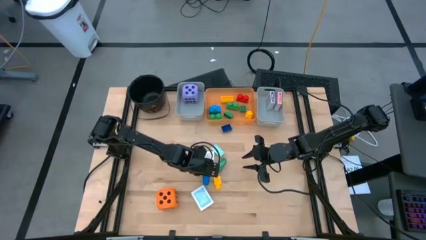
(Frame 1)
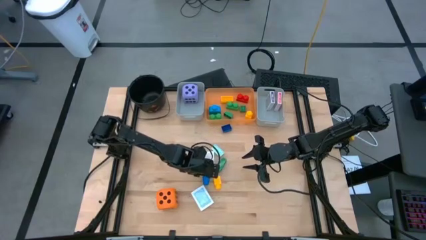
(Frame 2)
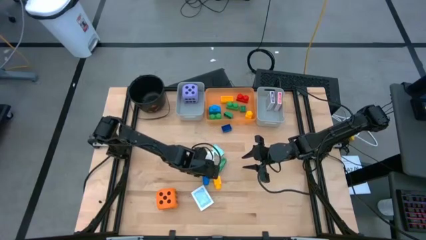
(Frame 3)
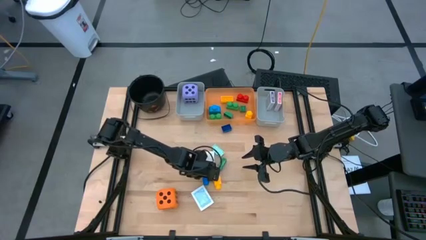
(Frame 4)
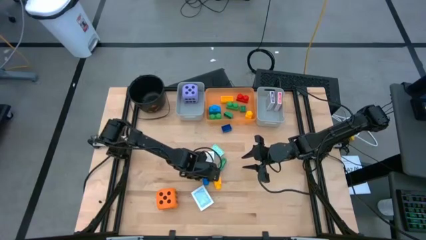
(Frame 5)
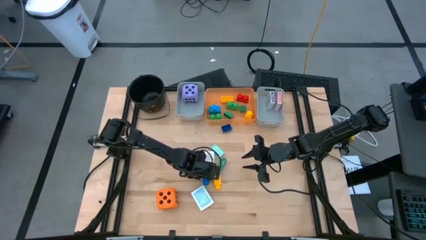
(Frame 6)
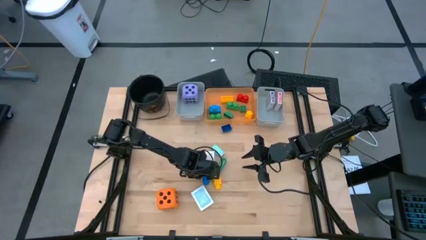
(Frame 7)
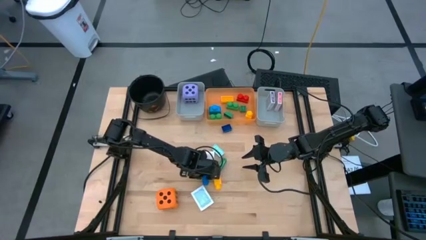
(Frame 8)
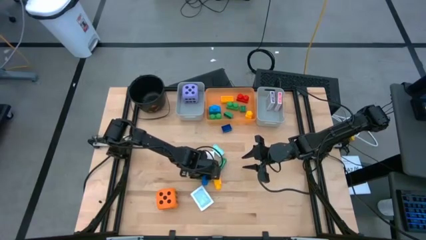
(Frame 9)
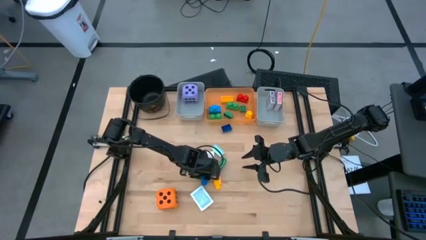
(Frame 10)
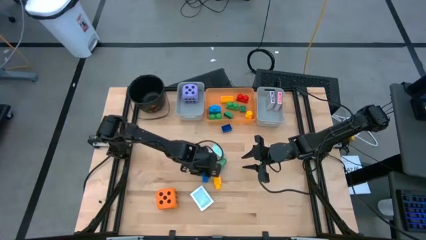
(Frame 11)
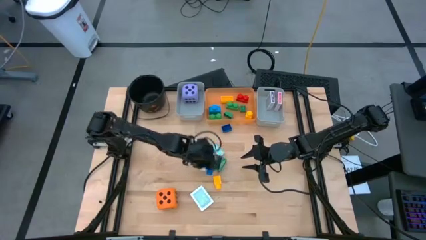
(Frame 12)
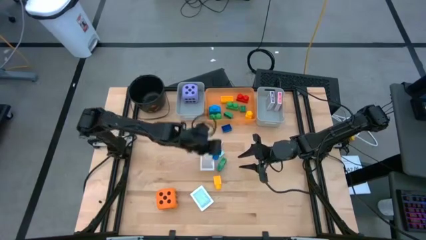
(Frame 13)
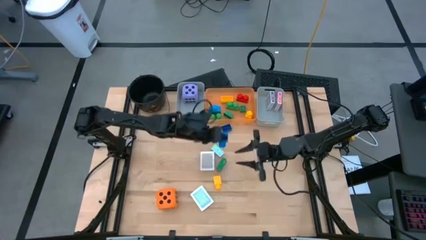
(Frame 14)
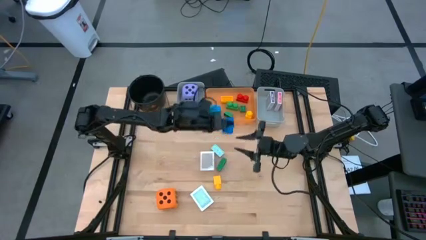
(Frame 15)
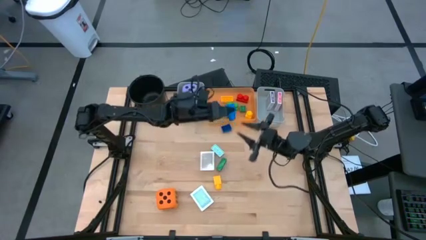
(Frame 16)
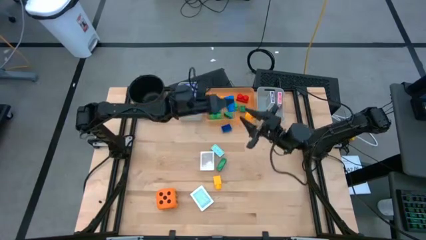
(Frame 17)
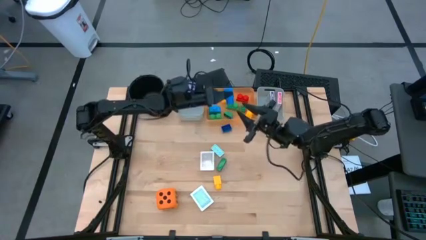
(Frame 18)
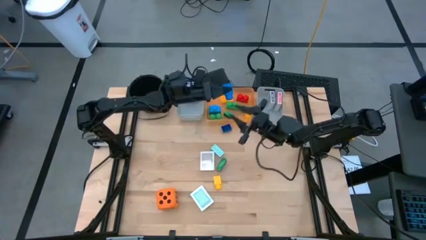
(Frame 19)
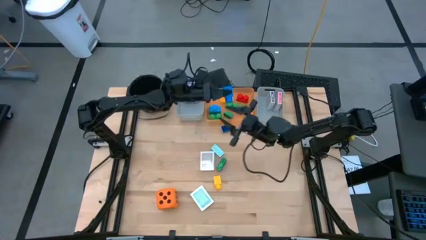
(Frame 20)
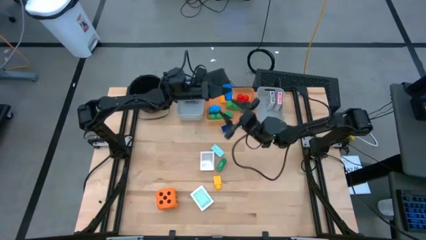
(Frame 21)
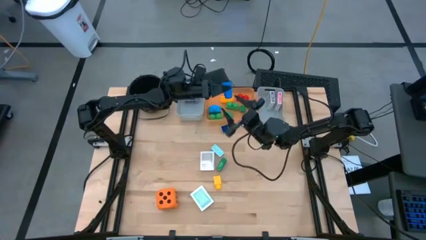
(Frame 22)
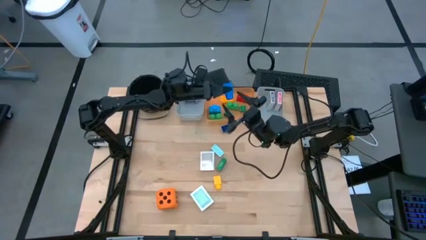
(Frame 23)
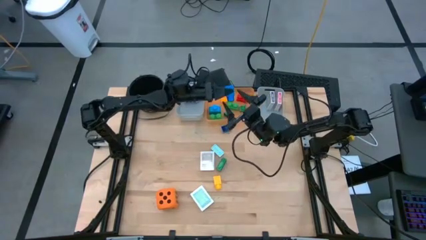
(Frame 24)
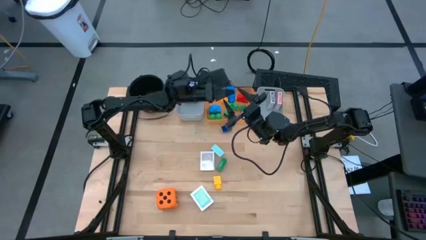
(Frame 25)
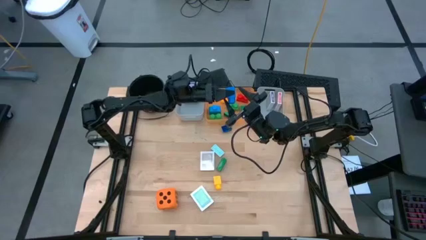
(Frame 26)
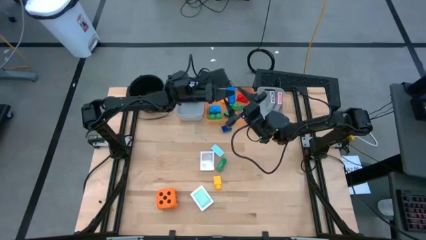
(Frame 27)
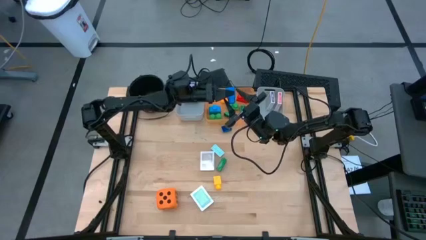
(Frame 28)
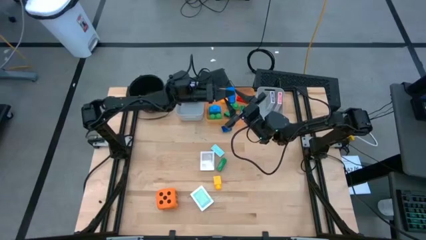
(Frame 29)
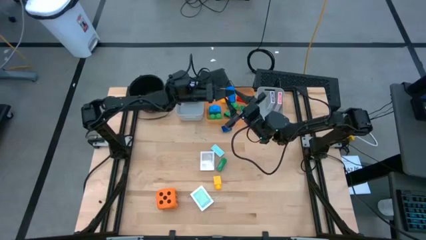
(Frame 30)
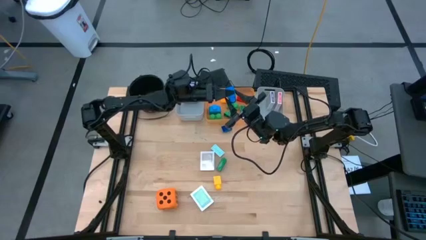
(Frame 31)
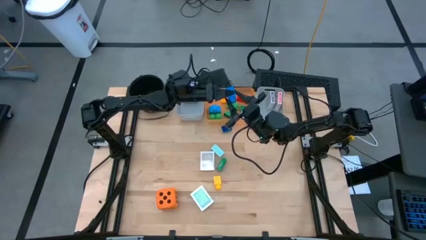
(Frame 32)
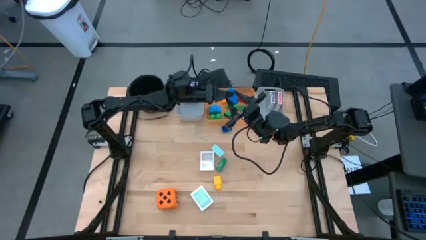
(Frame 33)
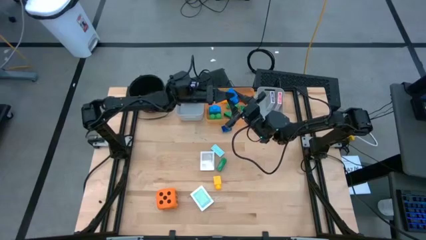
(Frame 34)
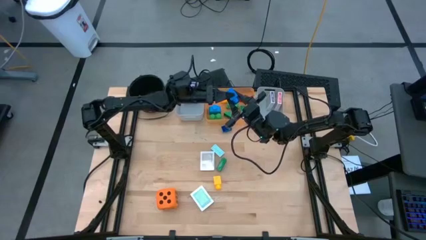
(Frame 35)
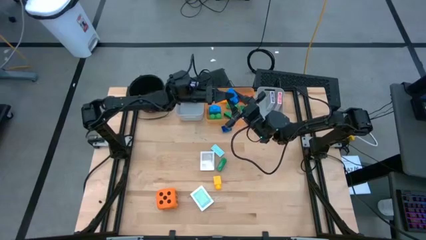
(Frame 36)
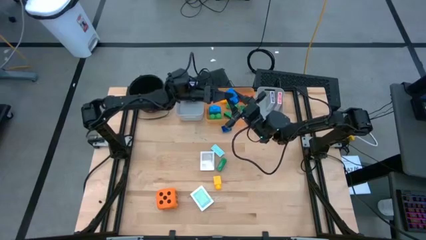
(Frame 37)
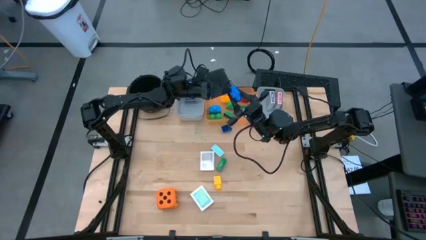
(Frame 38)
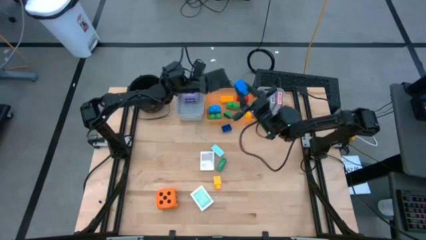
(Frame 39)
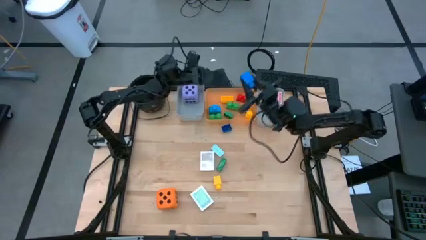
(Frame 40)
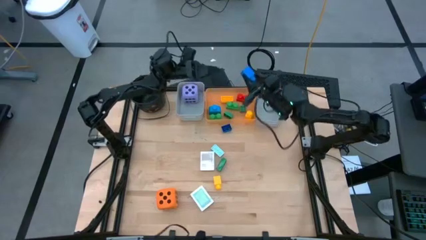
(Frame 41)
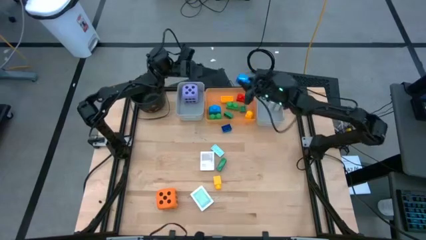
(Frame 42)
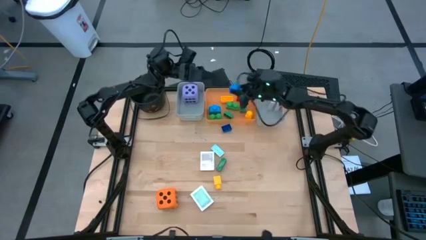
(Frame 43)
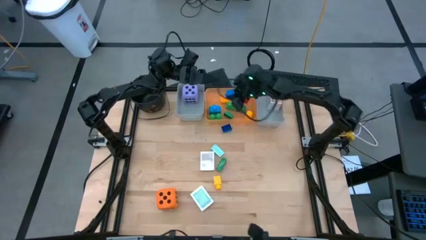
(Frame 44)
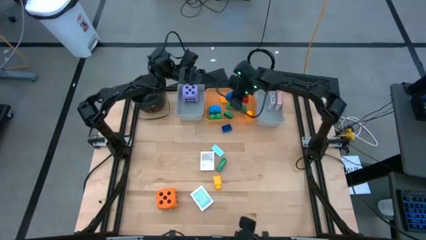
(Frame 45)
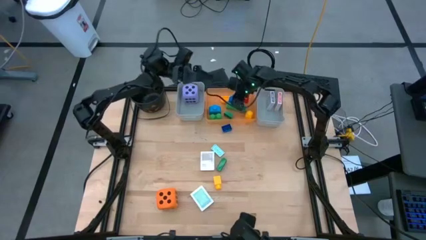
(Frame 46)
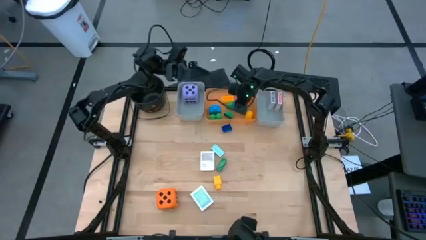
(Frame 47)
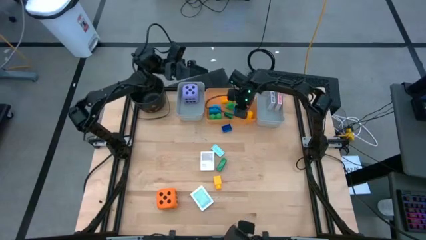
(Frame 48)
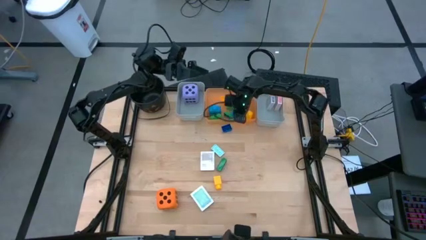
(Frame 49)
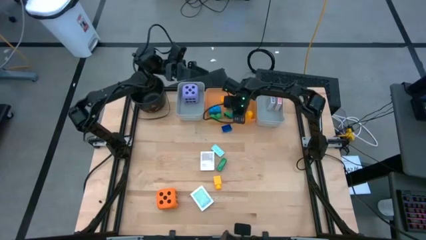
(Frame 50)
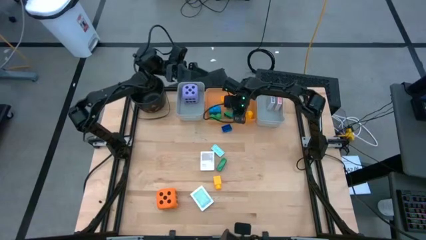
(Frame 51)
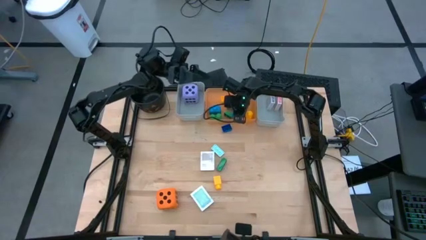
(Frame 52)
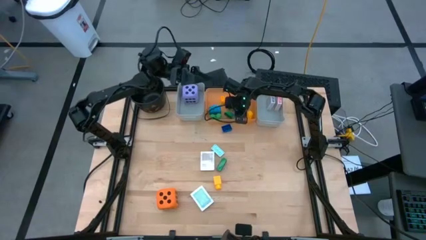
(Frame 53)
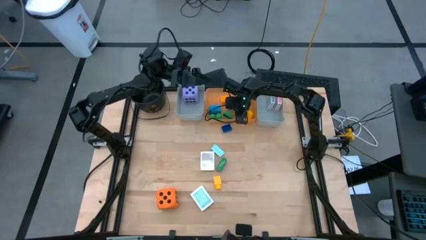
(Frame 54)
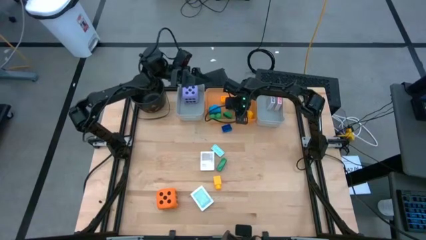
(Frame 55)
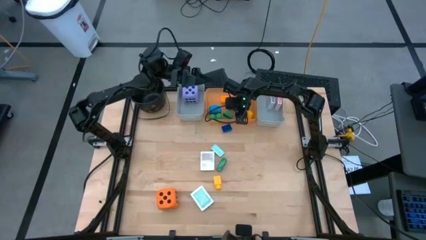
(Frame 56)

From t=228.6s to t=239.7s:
Task: Pick & Place Toys
Put the blue game piece into the orange bin
